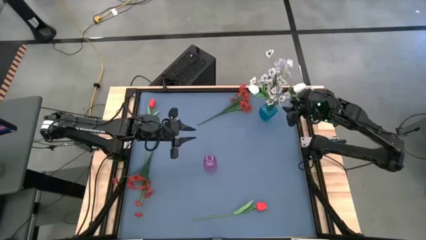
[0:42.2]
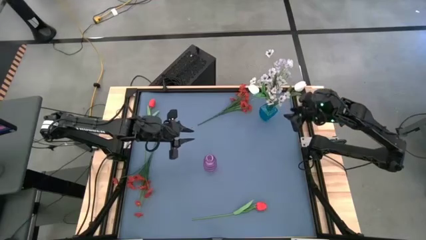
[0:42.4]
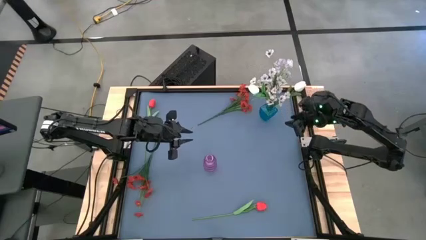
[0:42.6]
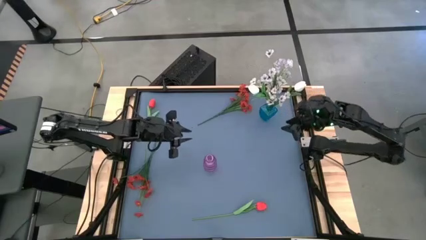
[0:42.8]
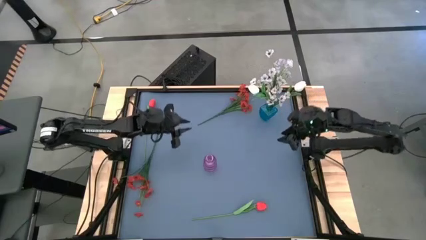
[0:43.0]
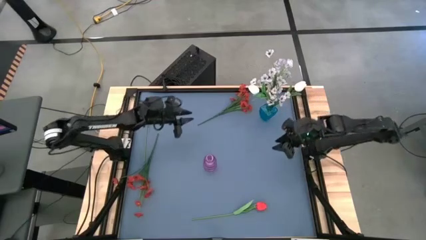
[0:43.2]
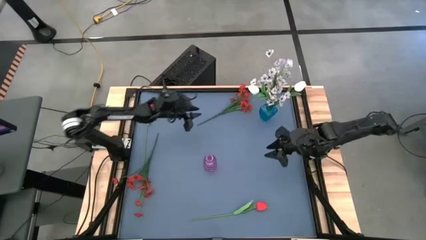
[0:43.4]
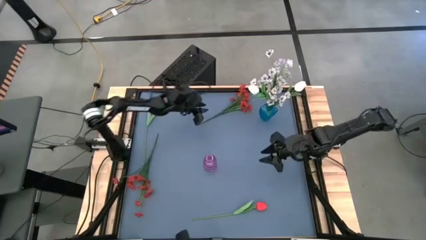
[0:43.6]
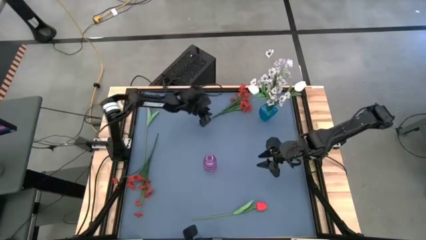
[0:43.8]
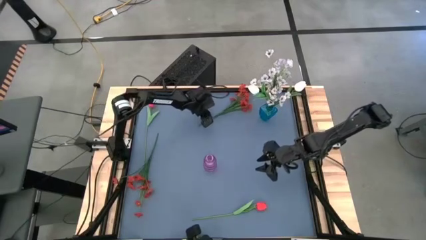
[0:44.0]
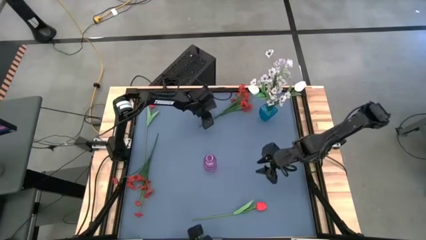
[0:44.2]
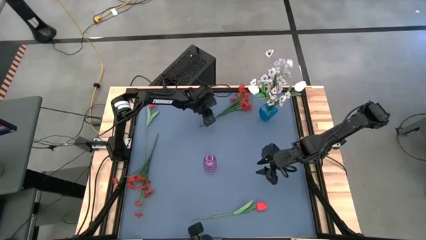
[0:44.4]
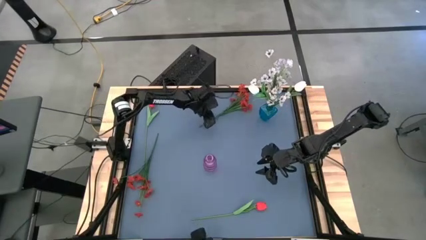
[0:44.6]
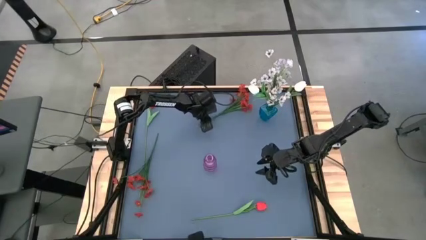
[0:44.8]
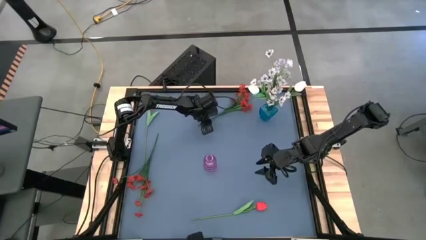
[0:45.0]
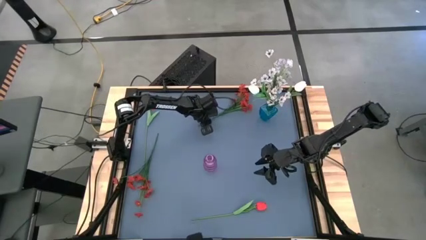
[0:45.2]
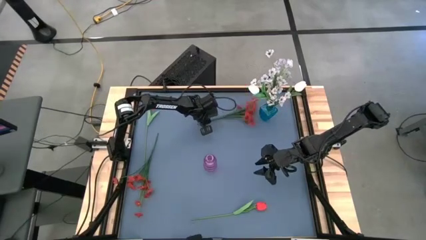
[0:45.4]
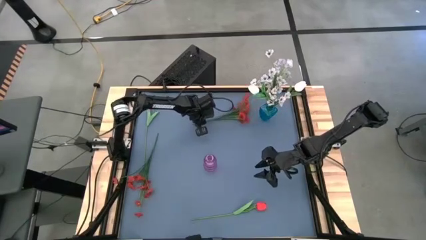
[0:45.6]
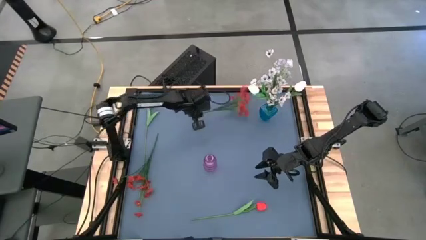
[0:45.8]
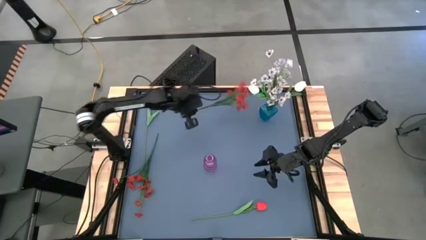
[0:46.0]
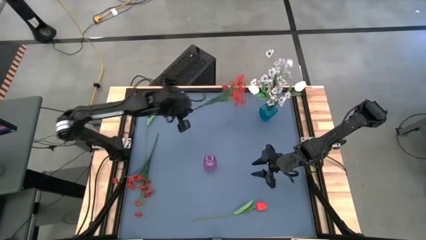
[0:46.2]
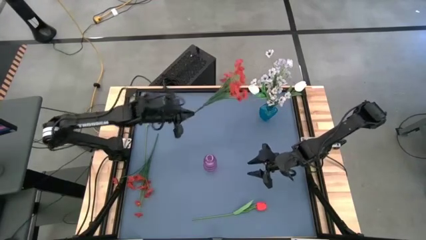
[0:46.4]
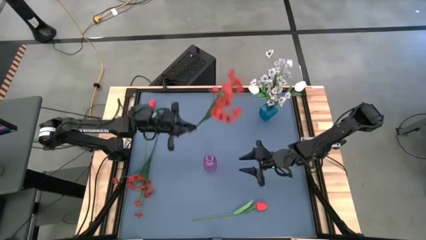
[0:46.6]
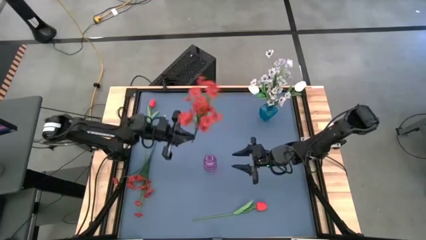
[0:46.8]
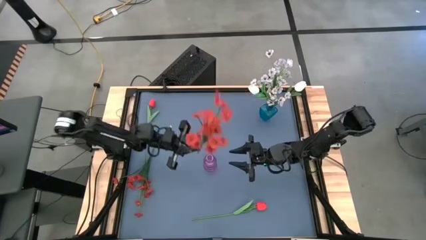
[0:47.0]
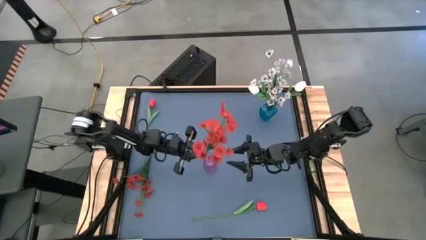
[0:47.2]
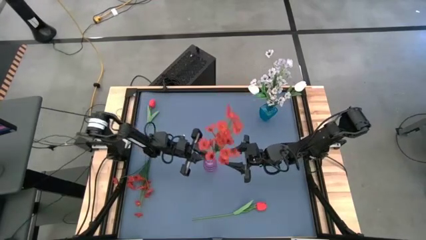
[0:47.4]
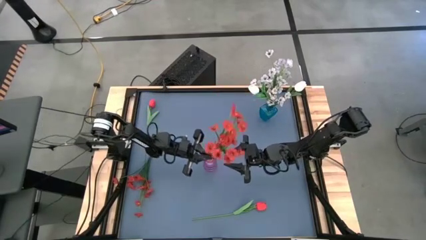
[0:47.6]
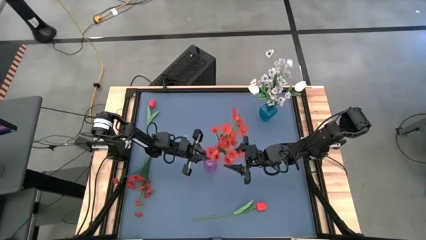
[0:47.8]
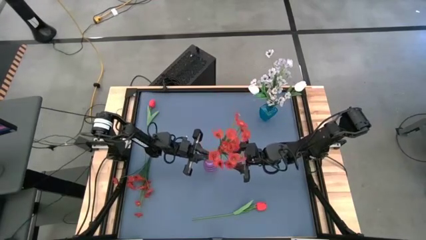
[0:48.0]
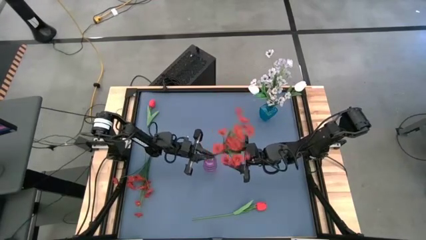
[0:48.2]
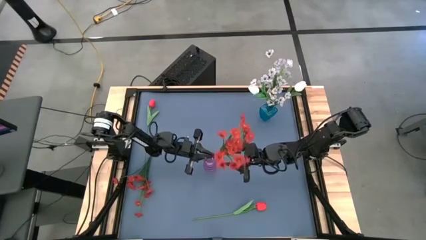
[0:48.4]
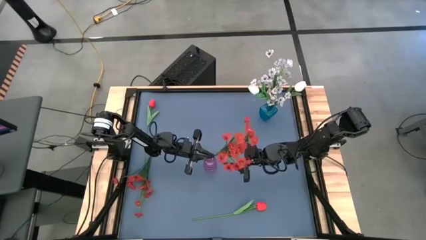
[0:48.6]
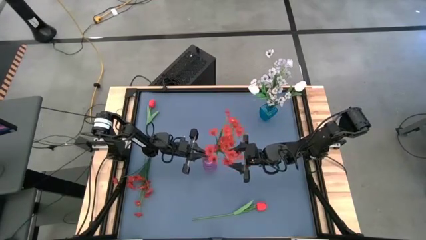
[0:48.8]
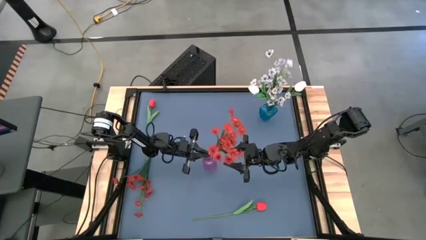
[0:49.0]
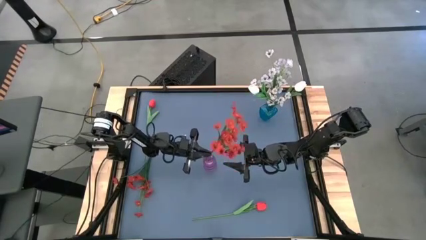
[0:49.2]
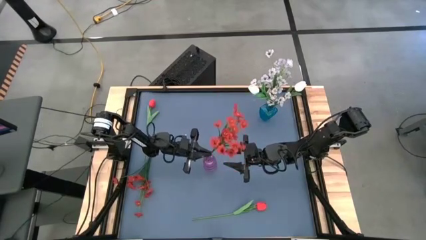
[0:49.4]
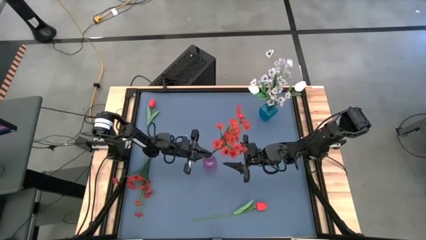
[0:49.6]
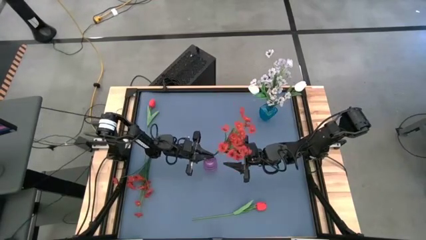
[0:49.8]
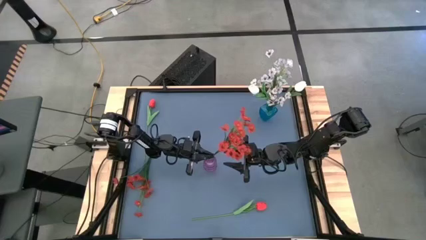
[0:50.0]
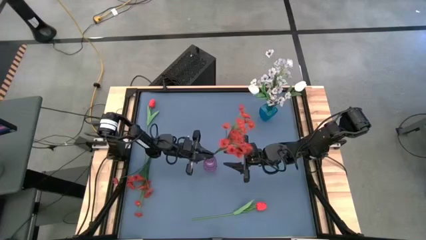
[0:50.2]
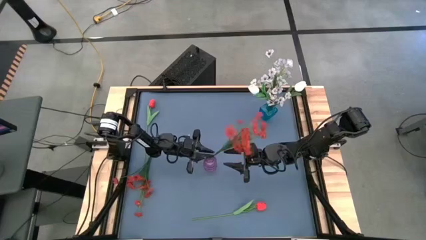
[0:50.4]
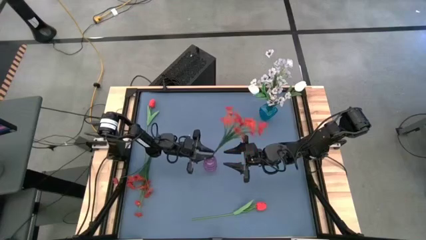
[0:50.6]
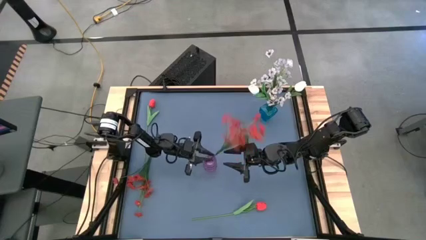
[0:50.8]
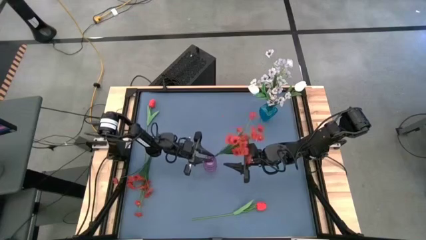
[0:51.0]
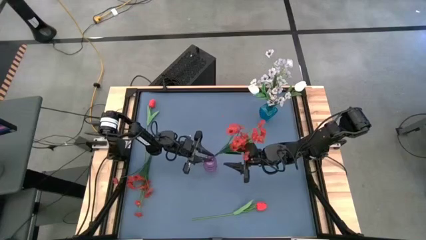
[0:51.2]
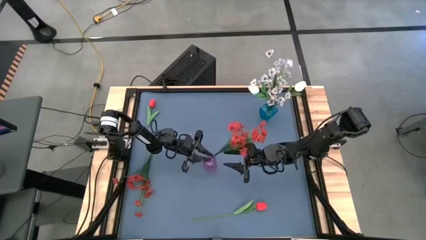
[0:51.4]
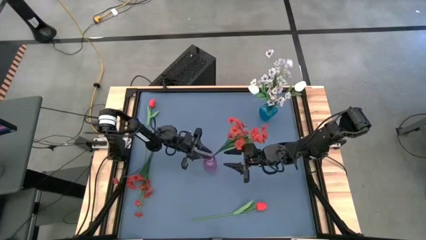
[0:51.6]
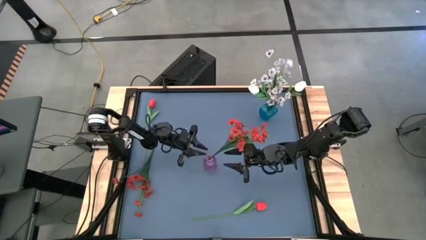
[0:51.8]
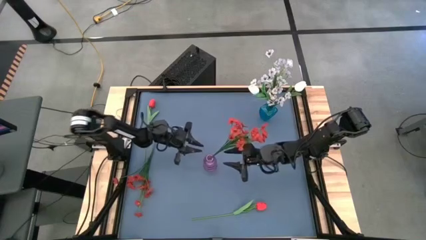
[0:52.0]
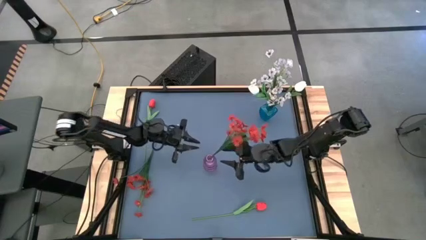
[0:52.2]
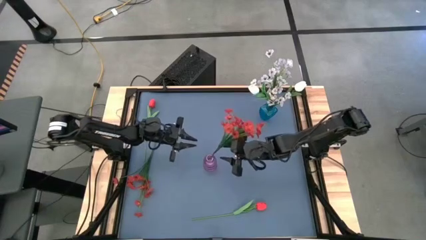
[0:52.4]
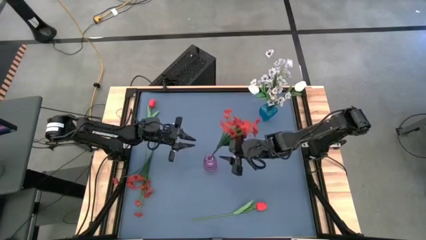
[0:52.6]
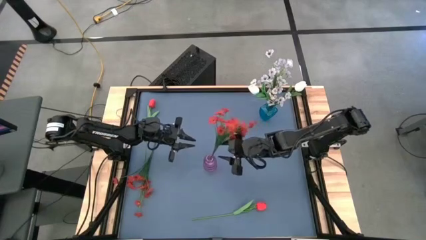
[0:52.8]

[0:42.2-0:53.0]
Task: Sort flowers into vase by color
Put the top red flowers into the purple vase
